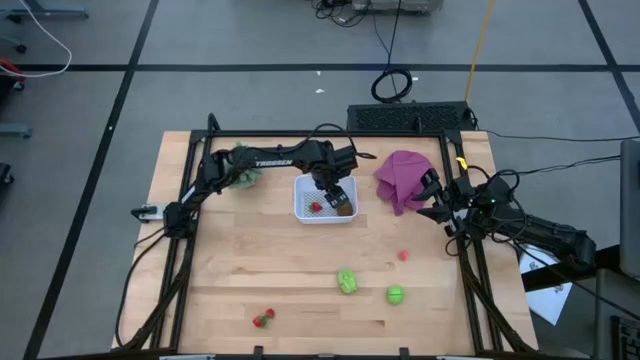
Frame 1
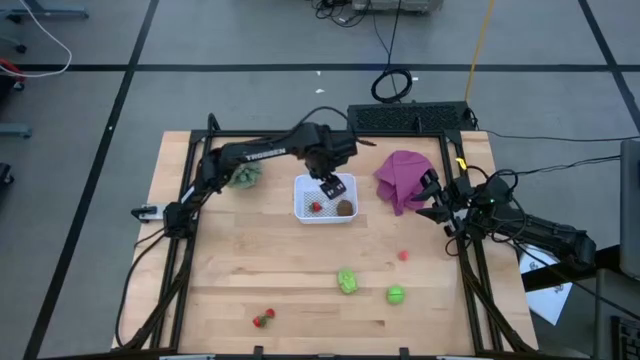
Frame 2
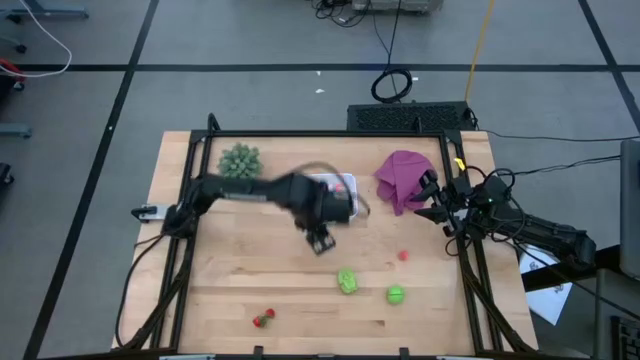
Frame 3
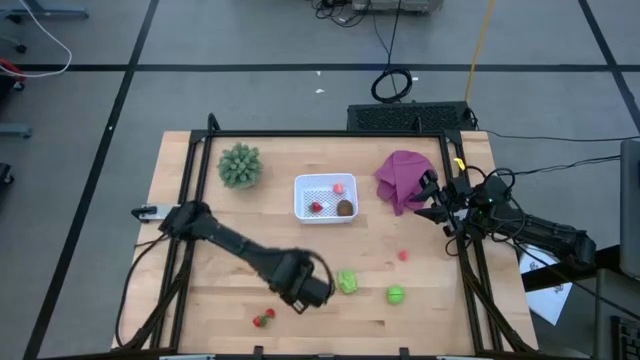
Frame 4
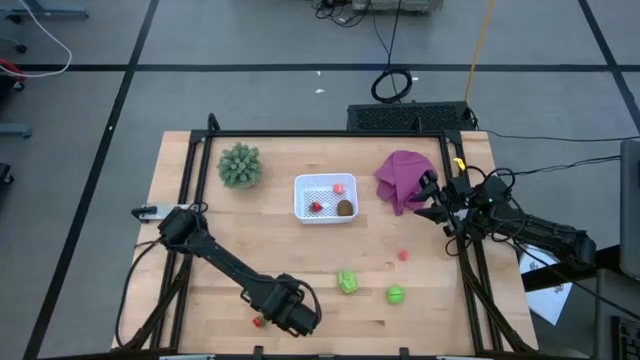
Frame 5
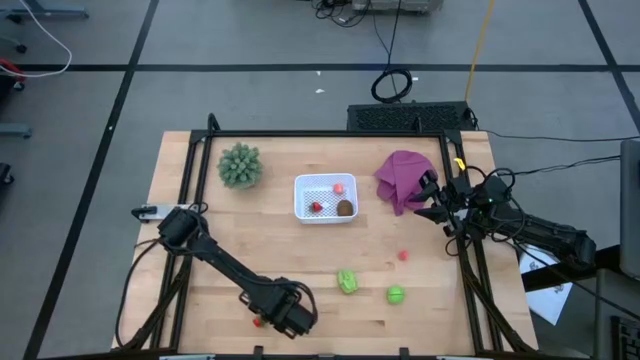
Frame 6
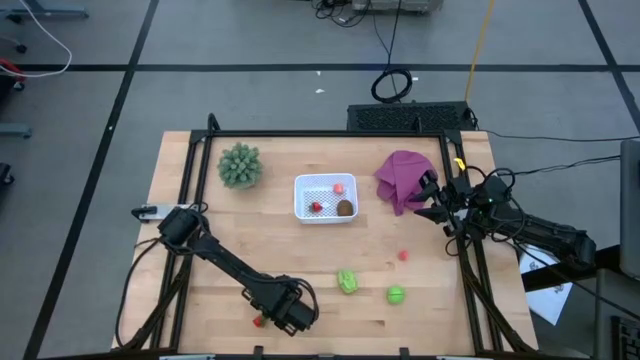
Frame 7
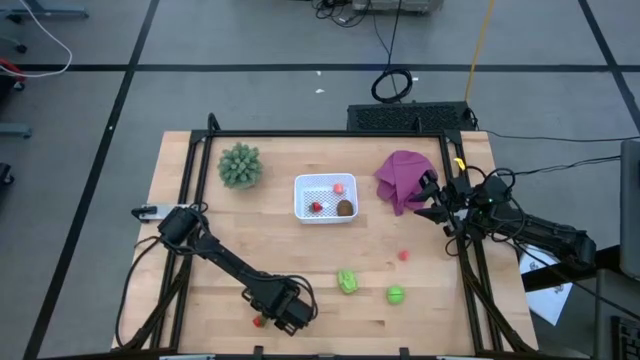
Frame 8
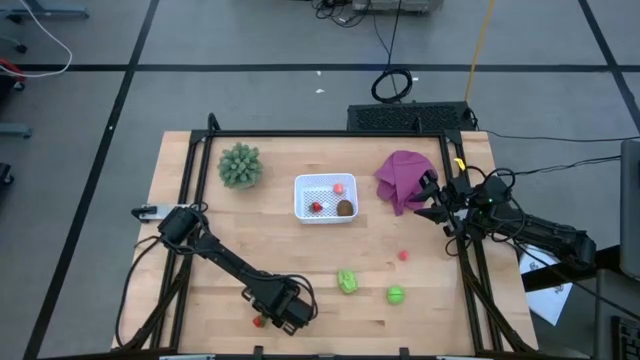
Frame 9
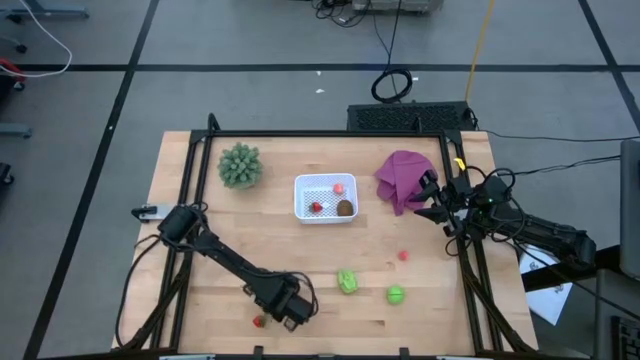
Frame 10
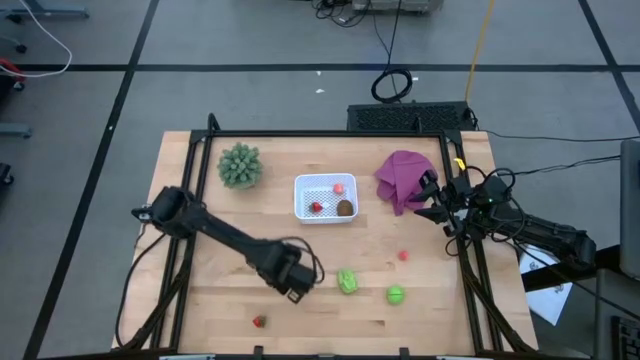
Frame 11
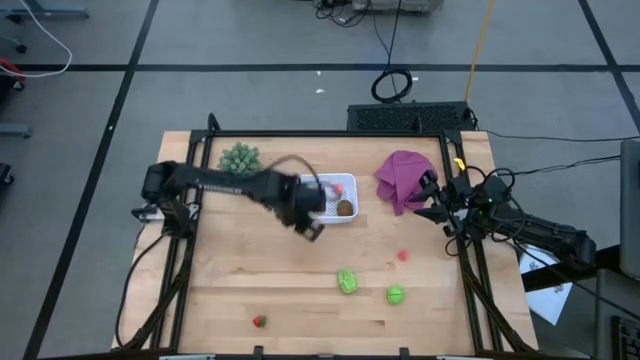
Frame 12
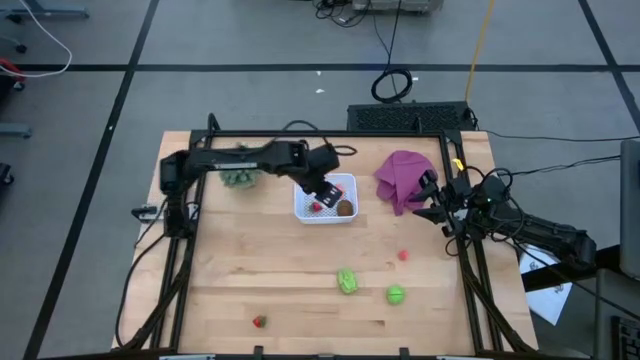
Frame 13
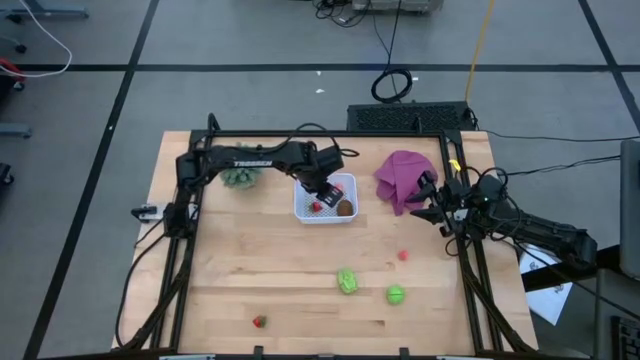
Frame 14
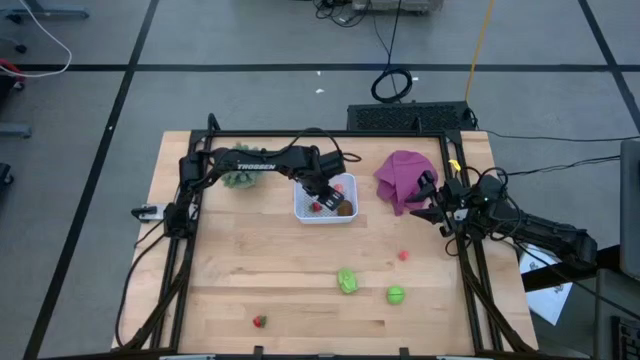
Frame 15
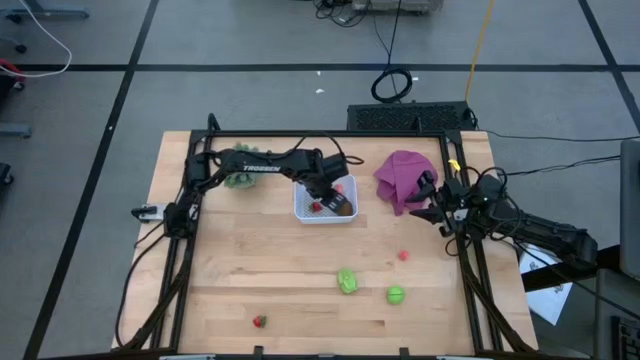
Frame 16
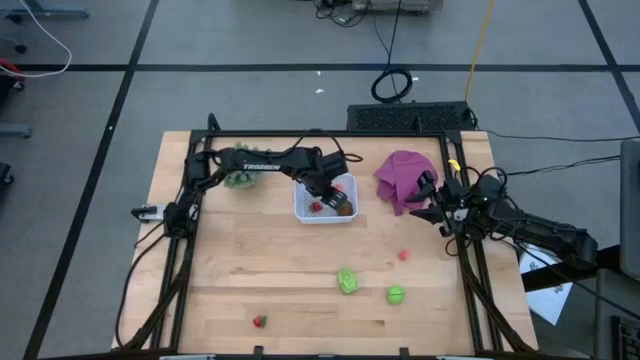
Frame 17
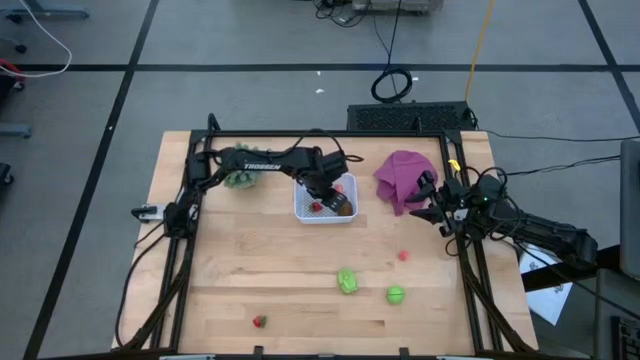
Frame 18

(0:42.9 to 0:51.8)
Task: Pick and placing Produce into tupperware
Put the right red strawberry in the white bin

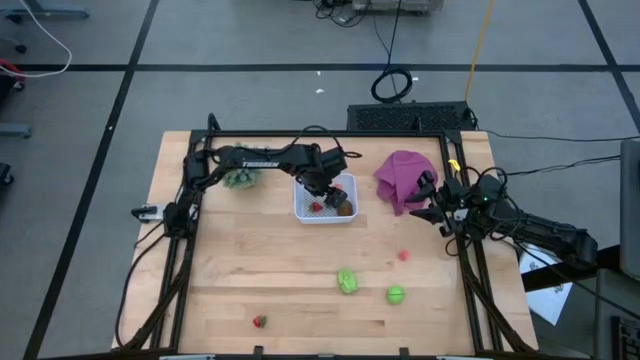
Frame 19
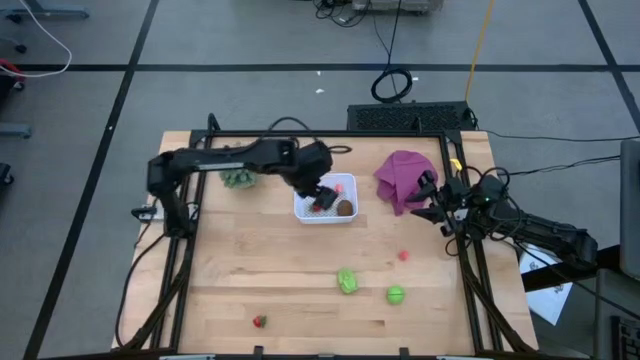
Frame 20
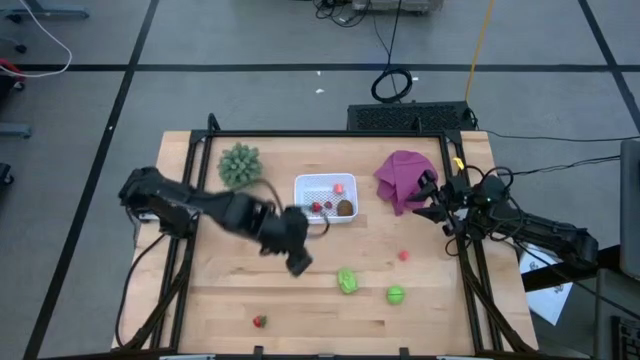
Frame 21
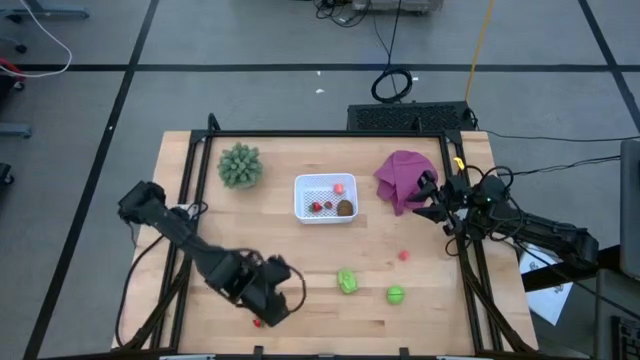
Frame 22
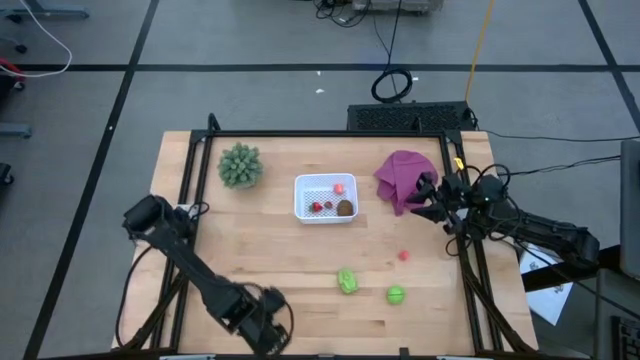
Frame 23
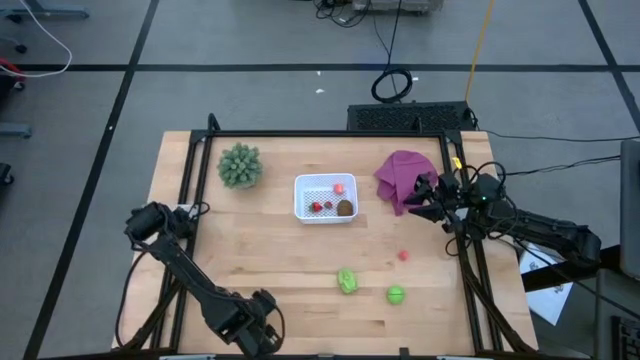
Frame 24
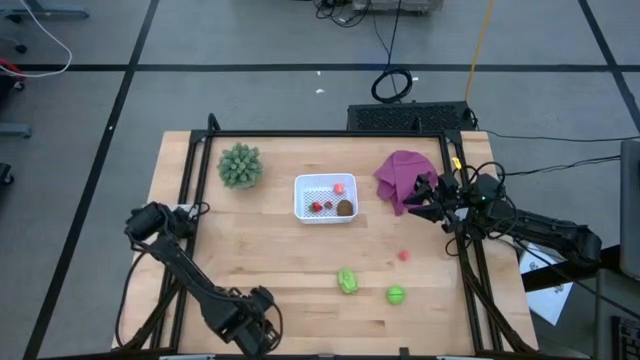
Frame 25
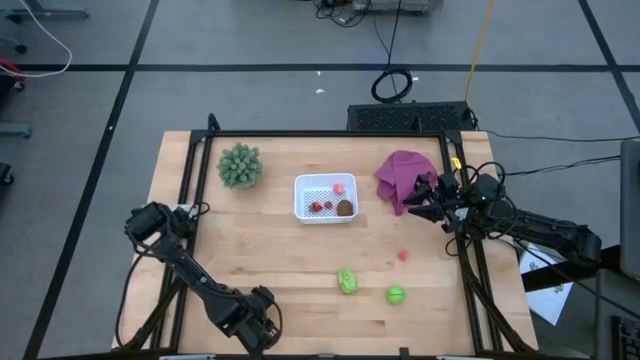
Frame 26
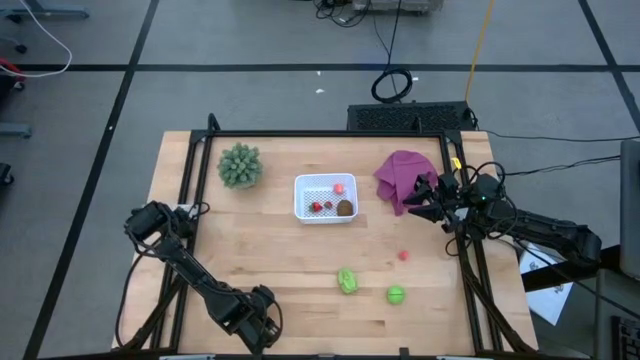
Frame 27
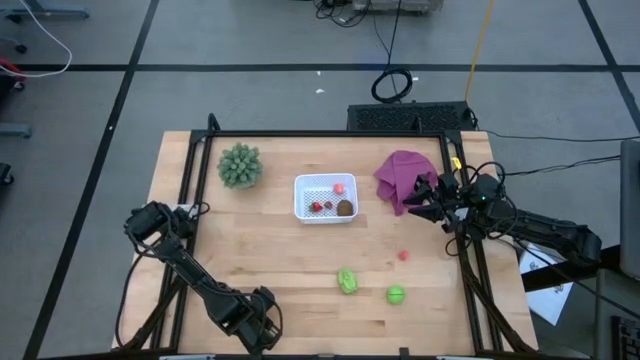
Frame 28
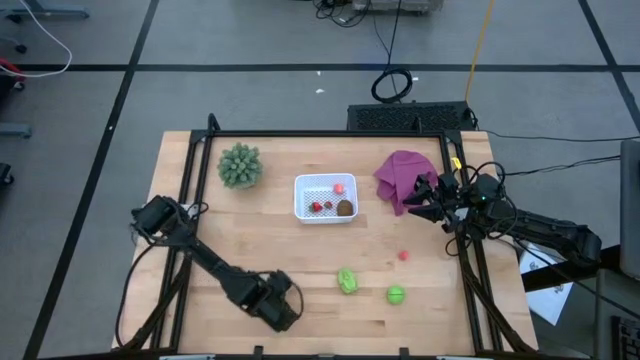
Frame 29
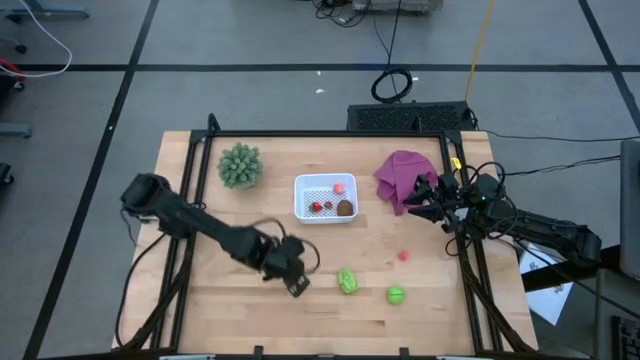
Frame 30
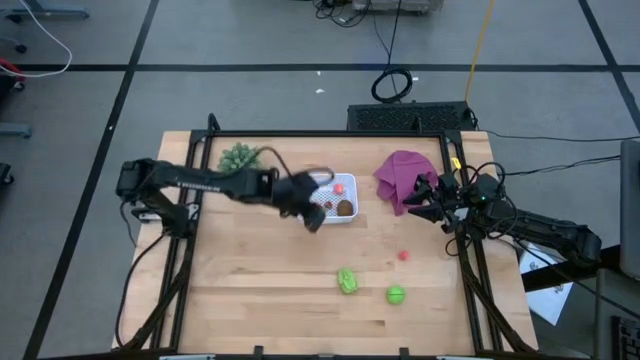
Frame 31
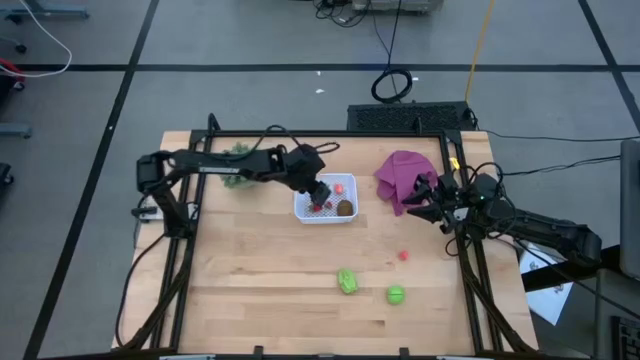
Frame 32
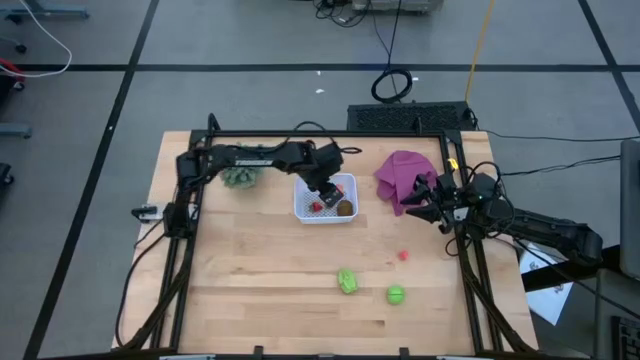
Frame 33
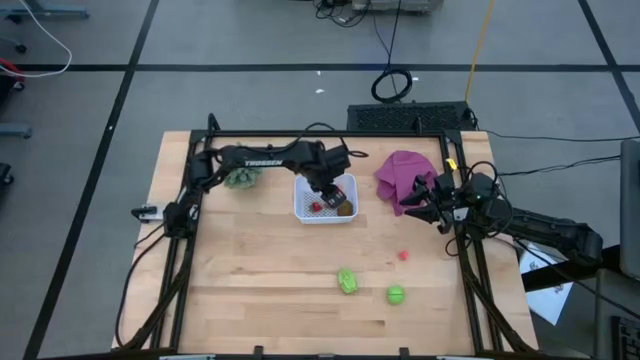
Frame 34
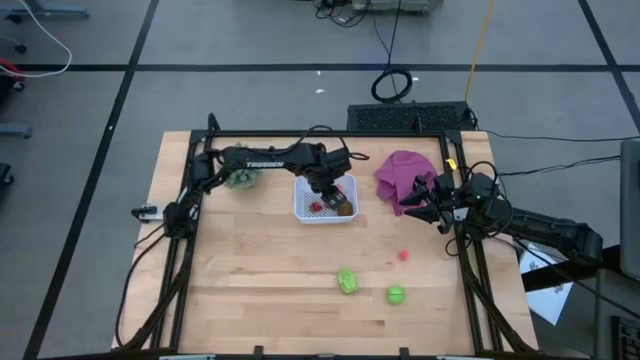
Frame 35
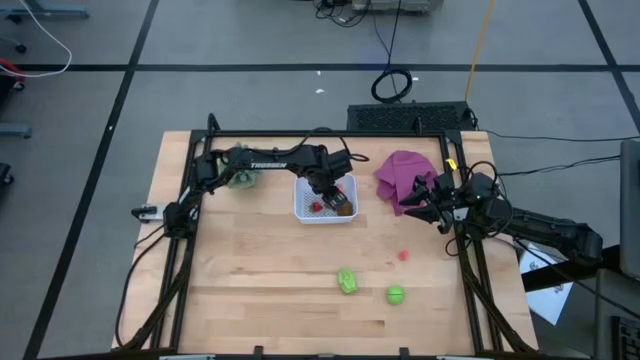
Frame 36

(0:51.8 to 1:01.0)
Put the red strawberry into the white bin

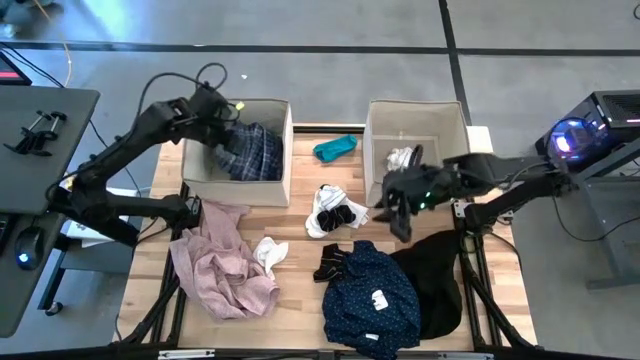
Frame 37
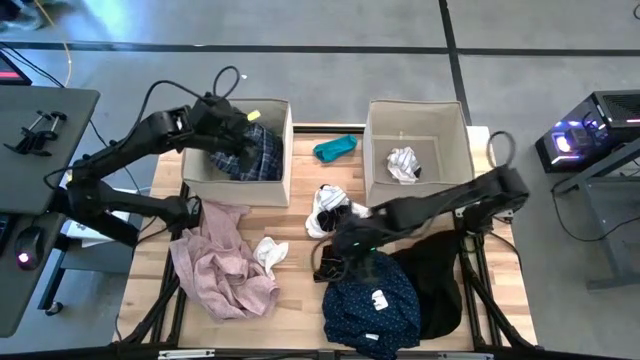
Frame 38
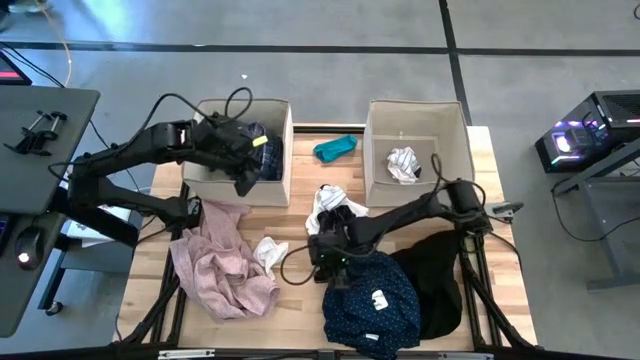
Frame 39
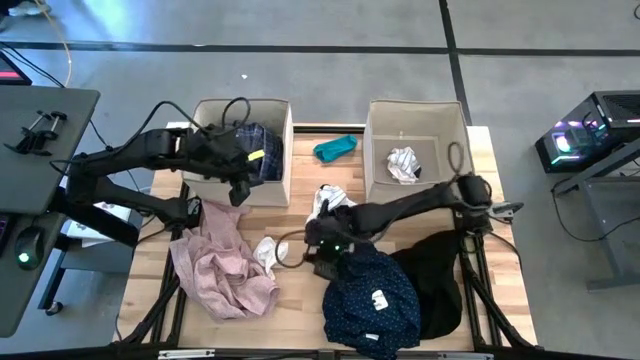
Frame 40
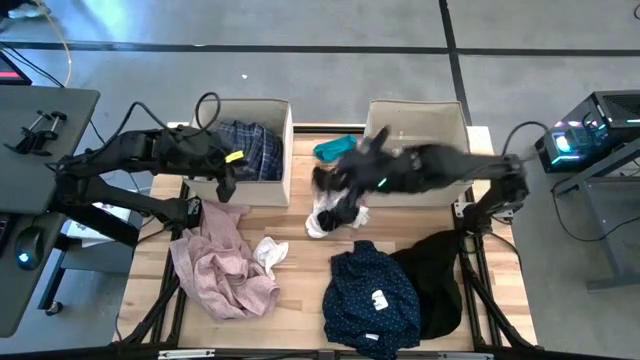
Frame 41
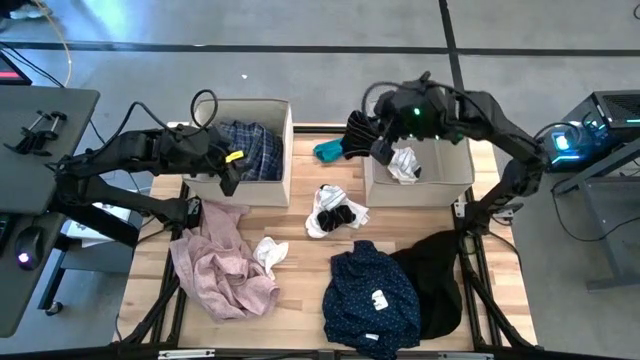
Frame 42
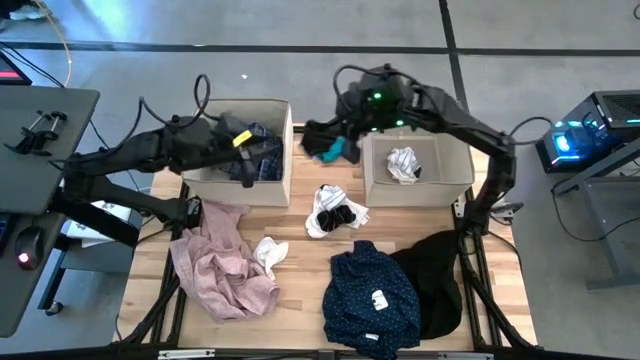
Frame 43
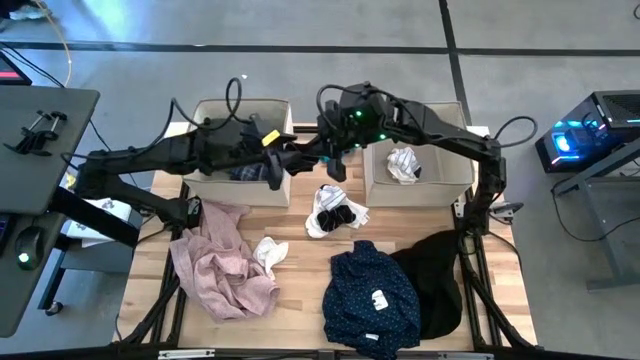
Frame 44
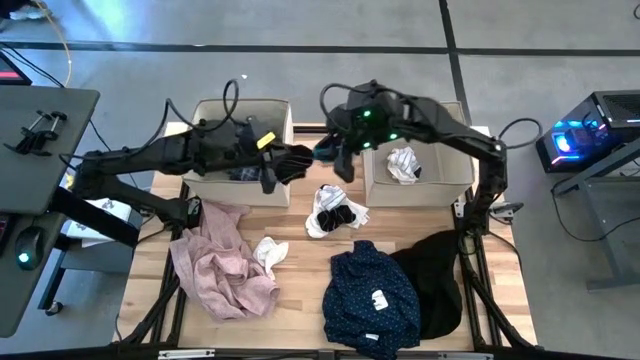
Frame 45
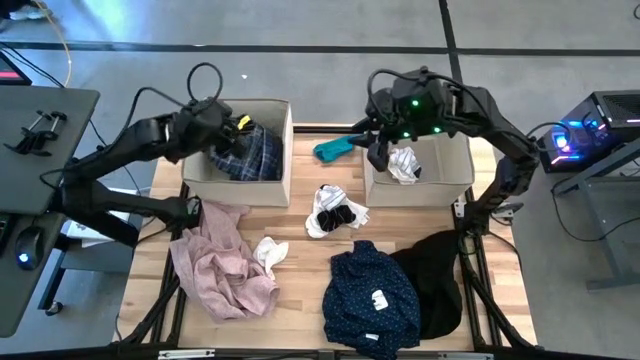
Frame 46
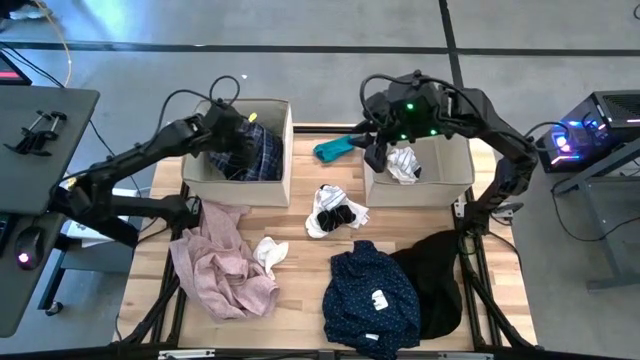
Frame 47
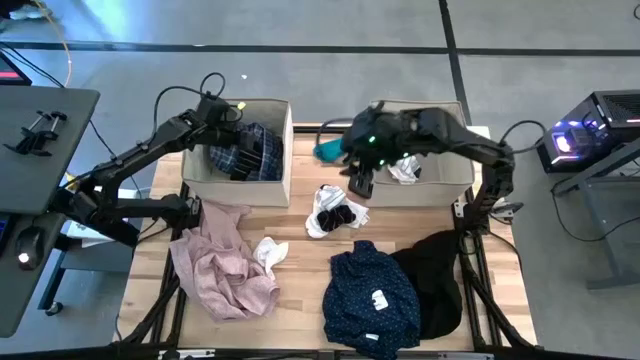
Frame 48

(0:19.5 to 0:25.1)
Task: Sort clothes
Put the black striped sock into the left laundry organizer
